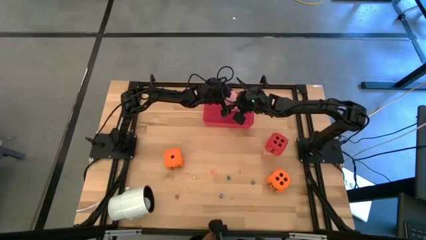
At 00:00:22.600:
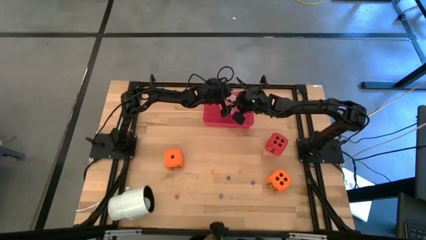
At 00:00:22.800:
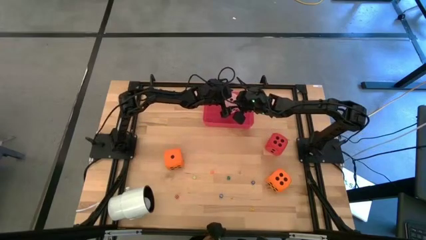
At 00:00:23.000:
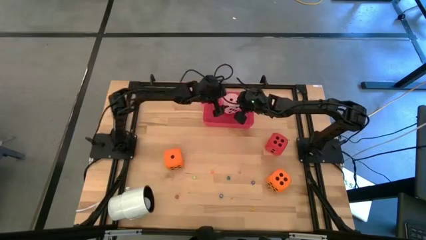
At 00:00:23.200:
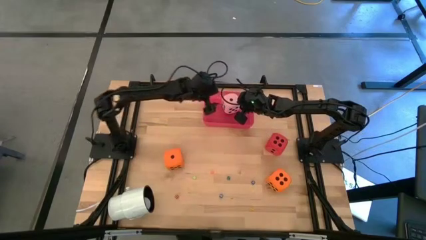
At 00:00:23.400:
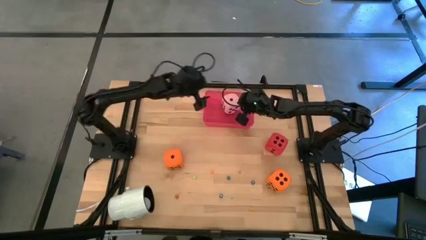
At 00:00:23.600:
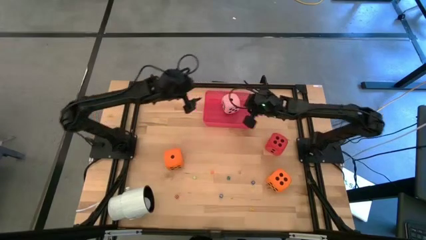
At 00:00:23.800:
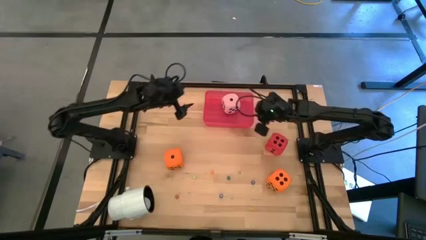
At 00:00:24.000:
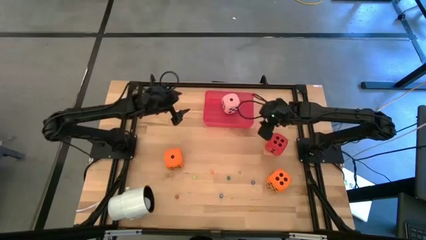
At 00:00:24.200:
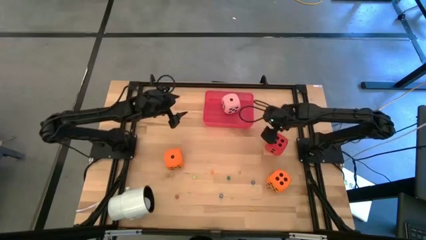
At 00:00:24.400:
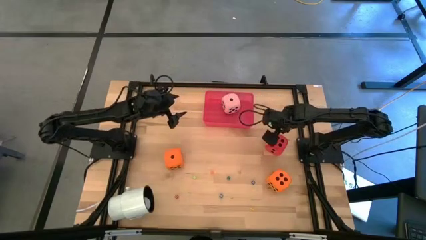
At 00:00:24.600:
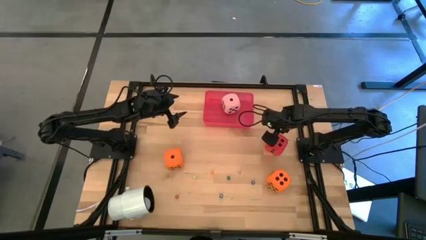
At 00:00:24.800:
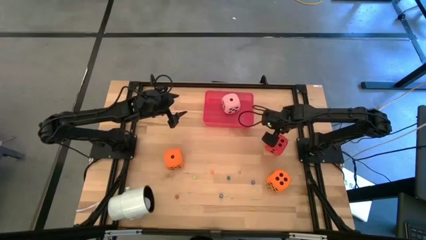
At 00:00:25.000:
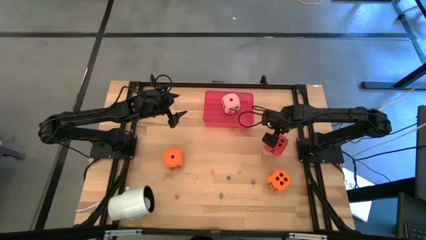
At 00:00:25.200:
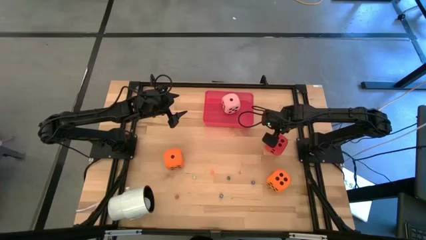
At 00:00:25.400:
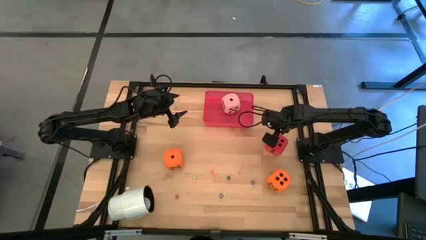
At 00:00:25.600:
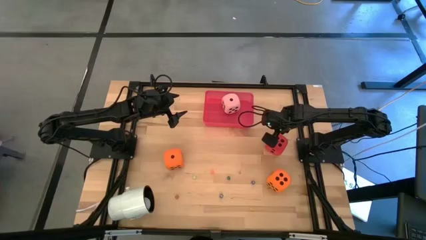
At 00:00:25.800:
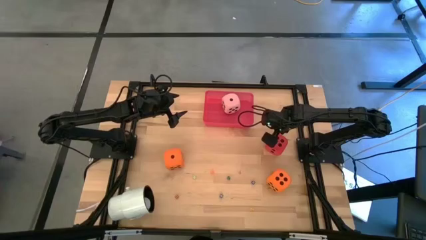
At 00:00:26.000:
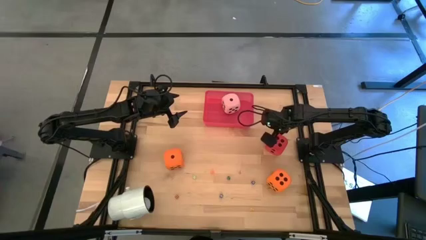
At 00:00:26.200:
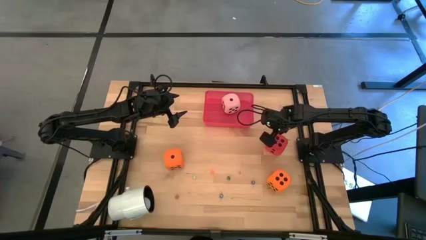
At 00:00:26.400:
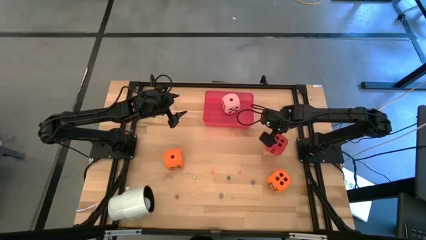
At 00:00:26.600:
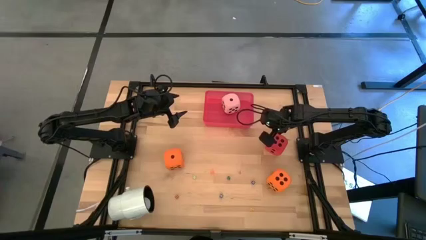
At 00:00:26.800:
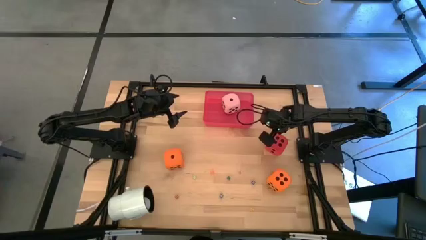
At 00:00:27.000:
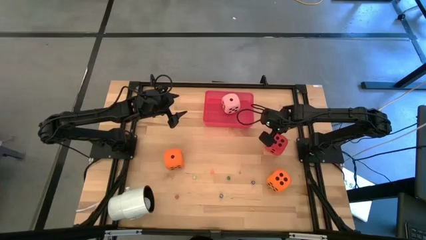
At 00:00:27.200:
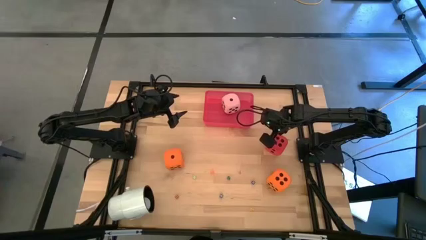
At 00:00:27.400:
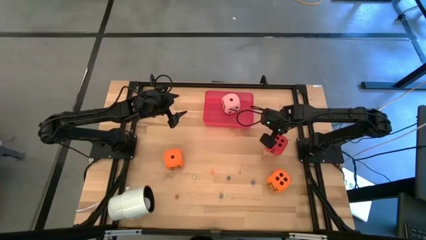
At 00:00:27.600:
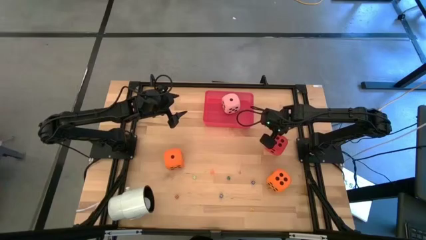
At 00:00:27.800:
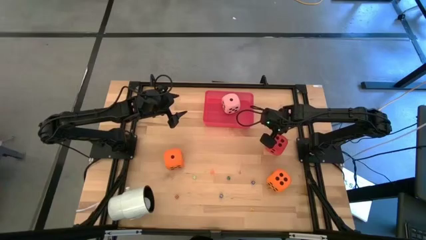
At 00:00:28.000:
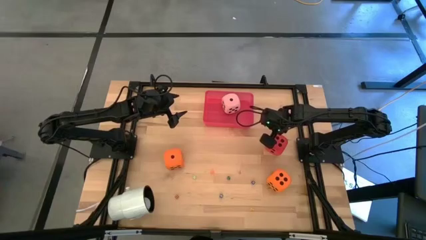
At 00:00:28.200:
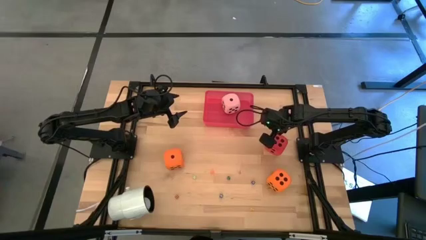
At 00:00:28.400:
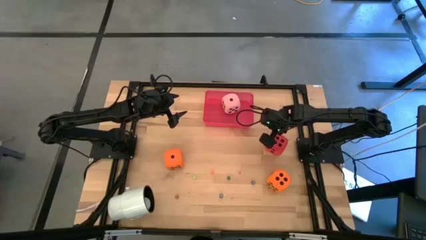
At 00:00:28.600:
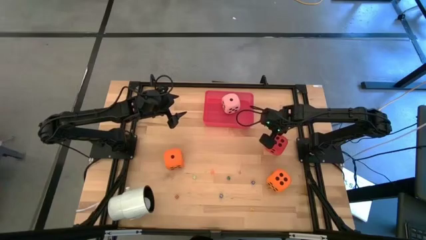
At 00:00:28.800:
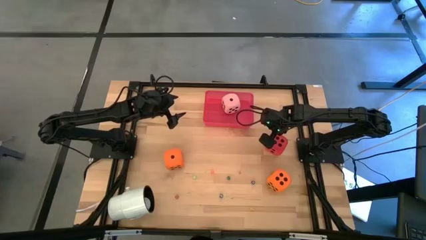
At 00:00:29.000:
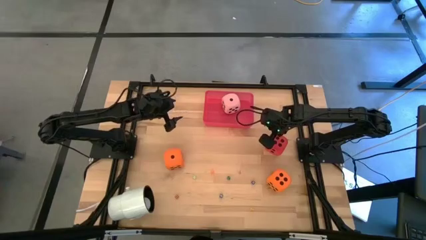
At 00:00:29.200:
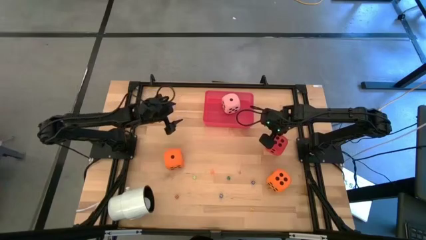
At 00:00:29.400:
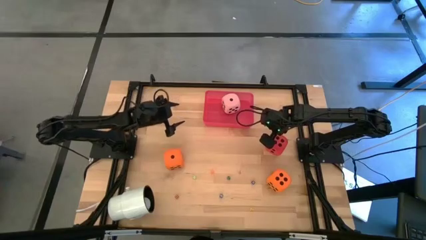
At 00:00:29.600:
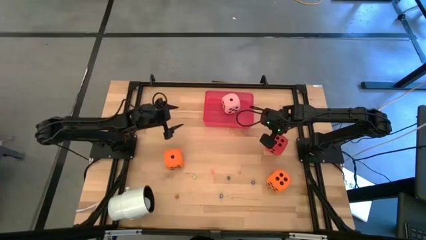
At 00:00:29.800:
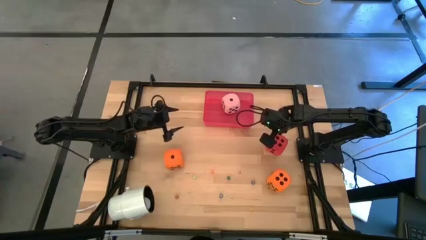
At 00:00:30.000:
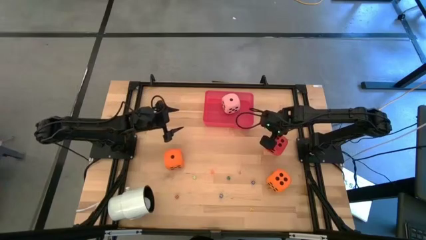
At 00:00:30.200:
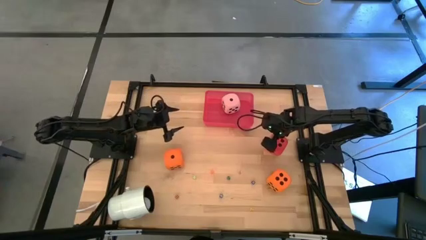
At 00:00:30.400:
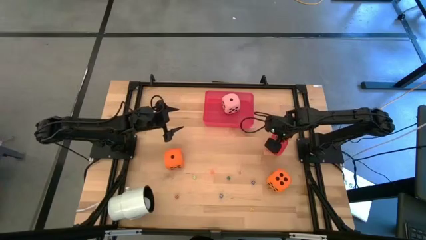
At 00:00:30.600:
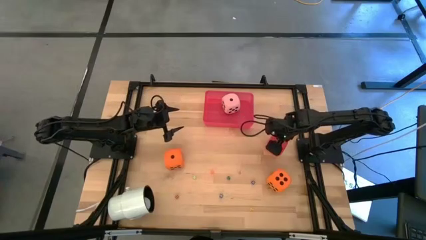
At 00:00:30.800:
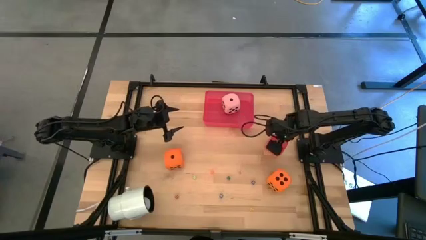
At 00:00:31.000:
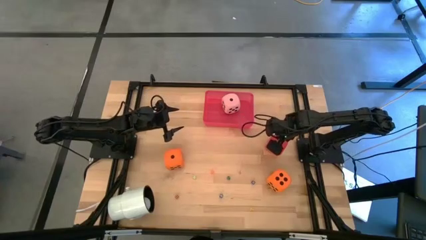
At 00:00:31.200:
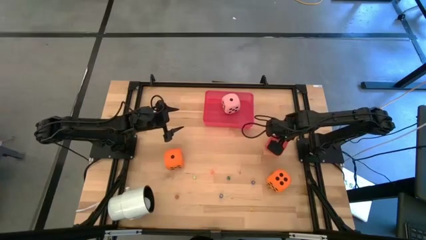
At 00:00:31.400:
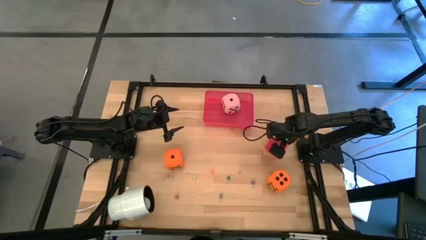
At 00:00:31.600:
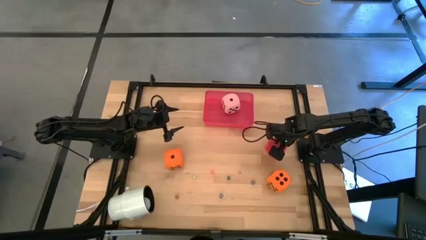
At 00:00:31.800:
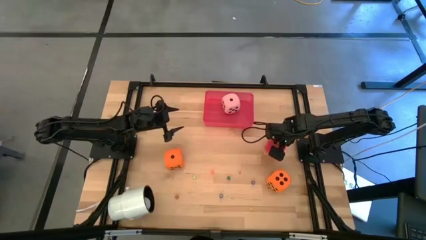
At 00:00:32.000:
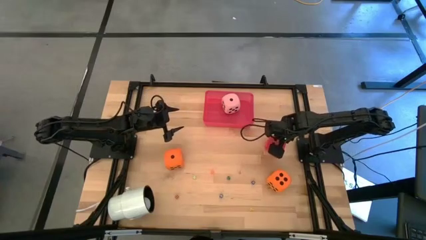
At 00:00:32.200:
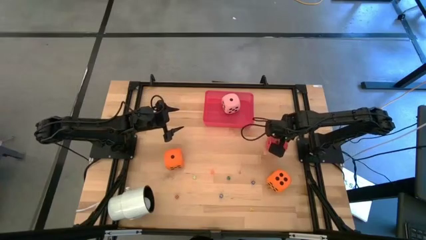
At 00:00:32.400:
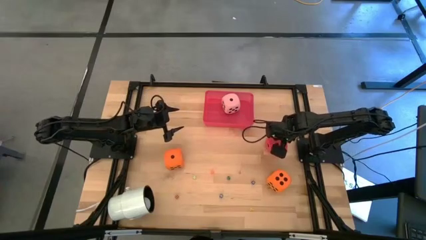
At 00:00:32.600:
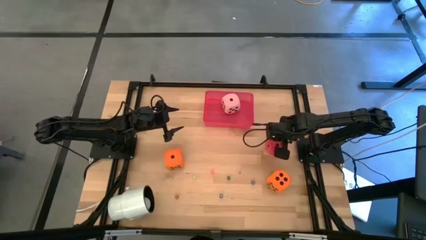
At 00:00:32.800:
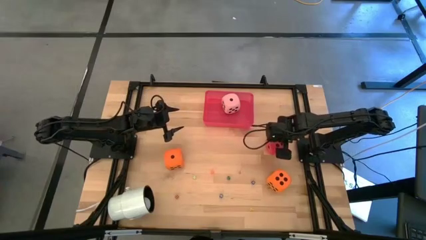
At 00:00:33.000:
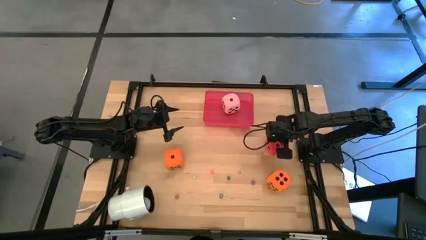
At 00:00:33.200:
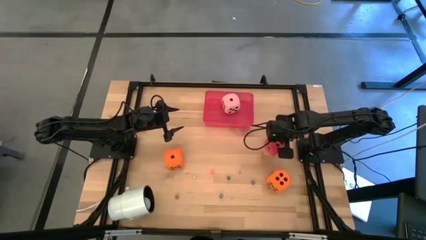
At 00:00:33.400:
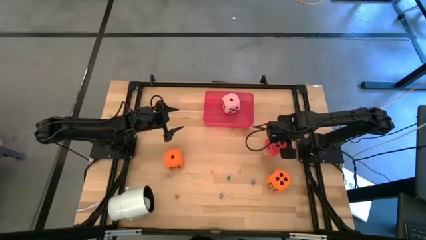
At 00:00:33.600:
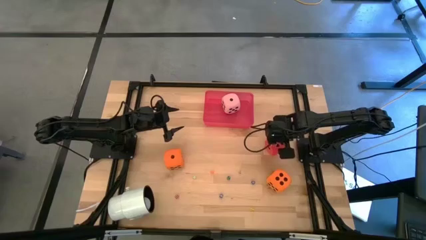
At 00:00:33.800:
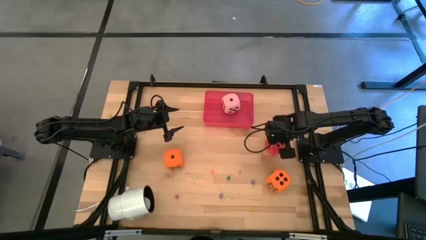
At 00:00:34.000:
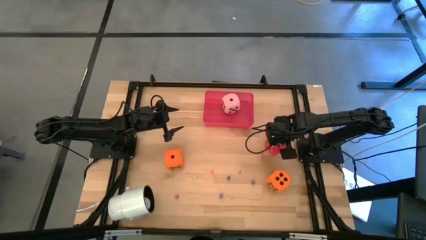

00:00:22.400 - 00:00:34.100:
Task: Pick & Place Dice
Put the large red dice into the red container
